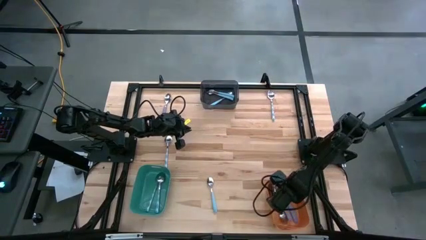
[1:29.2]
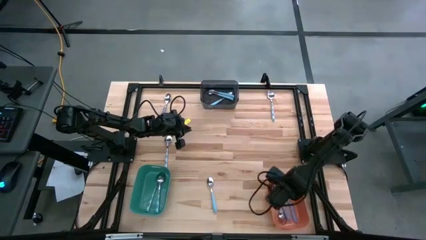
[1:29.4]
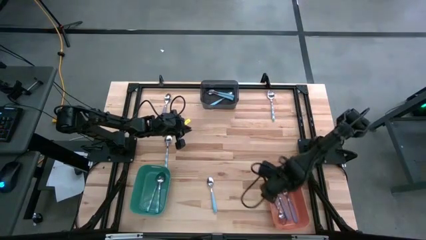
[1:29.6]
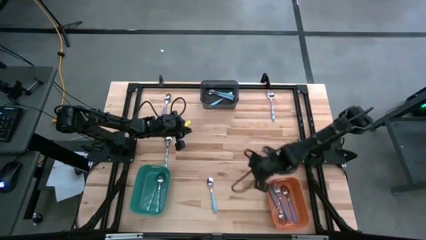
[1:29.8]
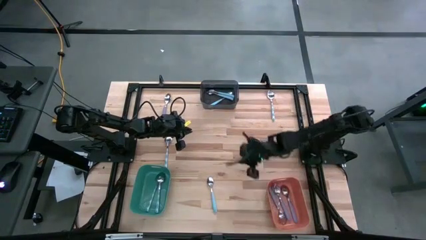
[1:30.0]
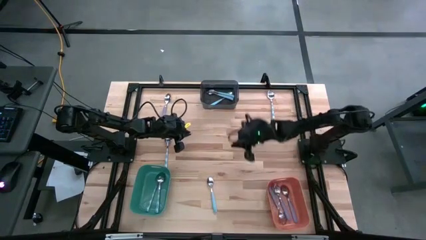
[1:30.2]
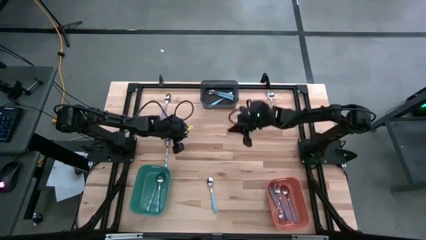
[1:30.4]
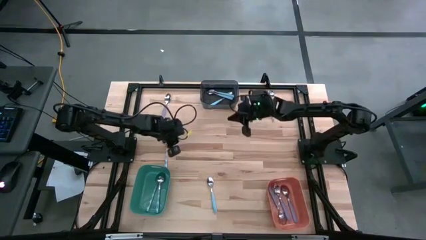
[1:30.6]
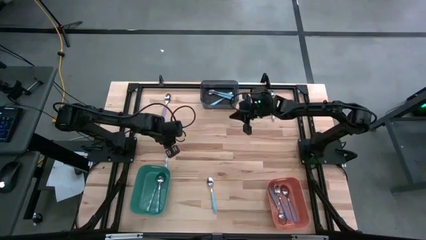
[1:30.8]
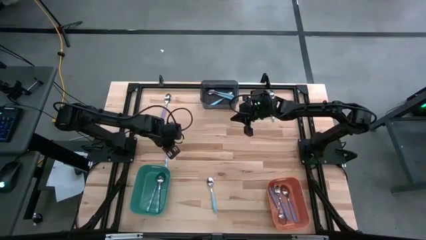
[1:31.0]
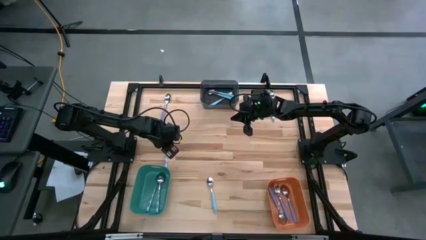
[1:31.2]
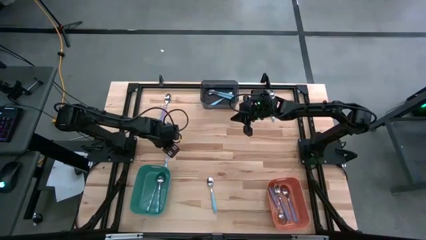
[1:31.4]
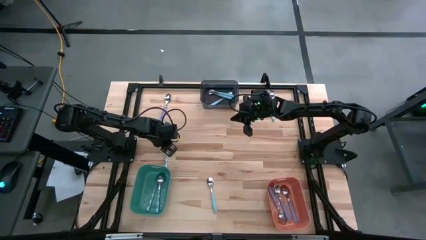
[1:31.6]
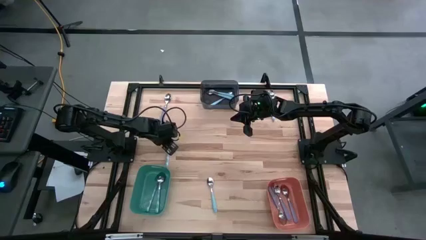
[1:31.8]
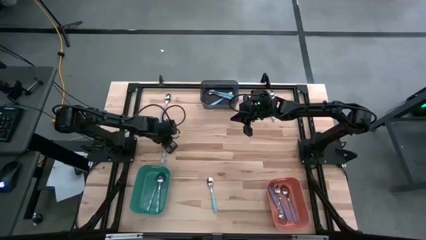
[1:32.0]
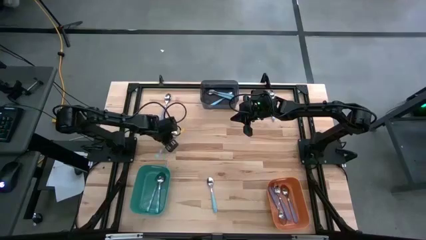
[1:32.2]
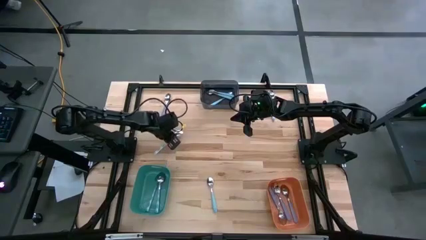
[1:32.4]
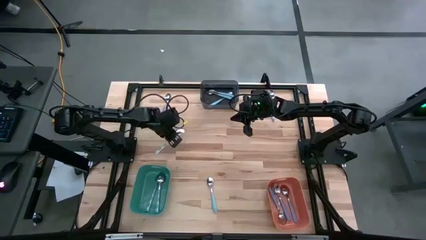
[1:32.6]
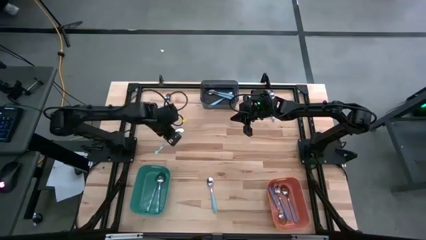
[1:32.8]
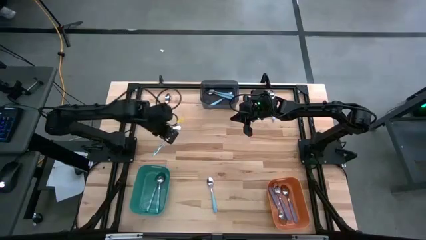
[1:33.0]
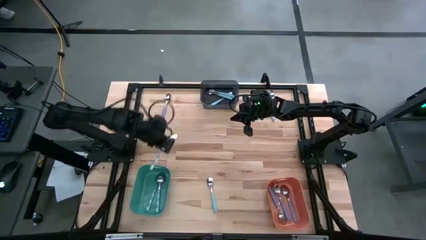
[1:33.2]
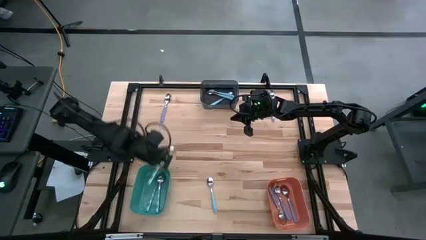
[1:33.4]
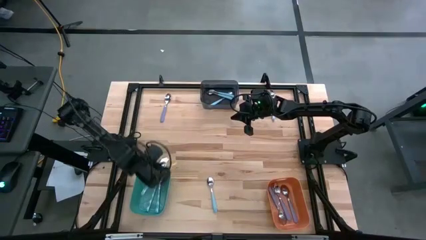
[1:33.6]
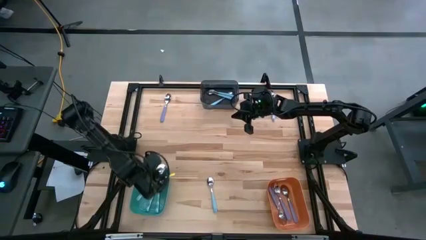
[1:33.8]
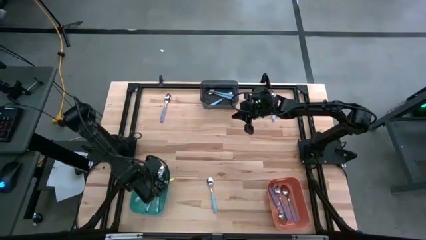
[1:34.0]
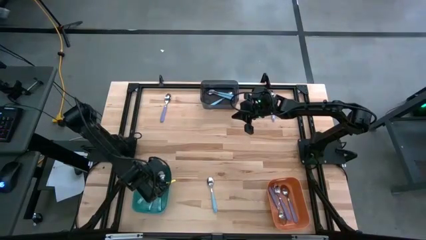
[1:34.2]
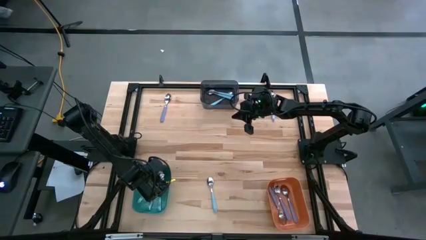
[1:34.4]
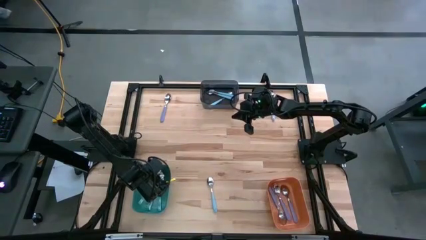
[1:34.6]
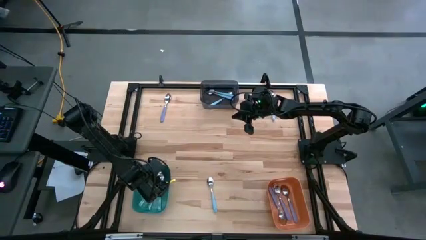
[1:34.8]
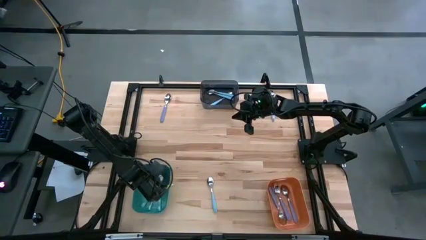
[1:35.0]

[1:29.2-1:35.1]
Task: Sort silverware by color (type)
Put the white and blue spoon into the blue bin

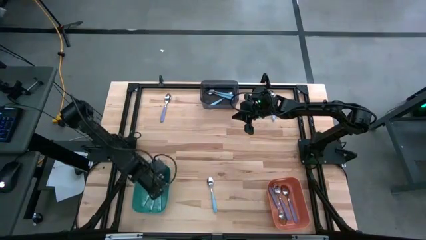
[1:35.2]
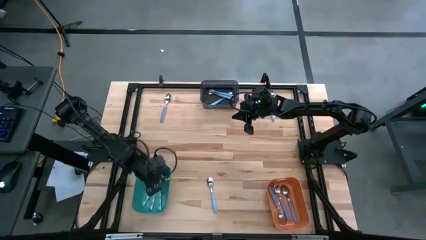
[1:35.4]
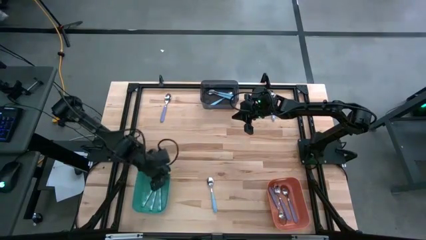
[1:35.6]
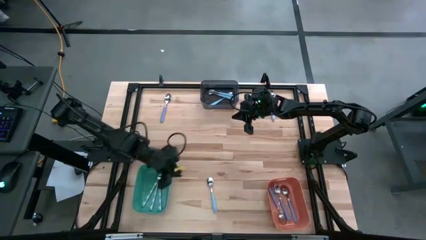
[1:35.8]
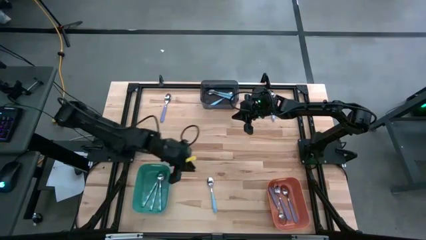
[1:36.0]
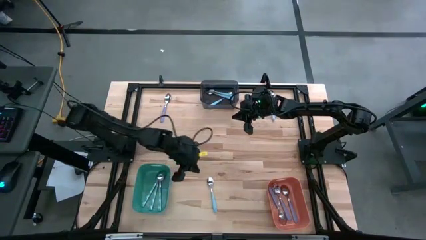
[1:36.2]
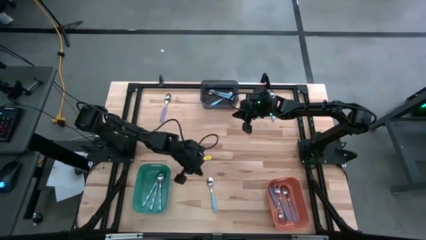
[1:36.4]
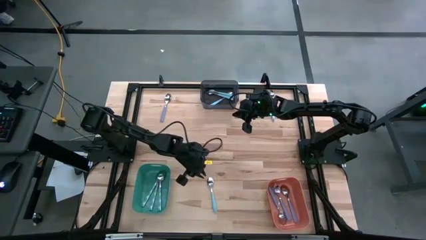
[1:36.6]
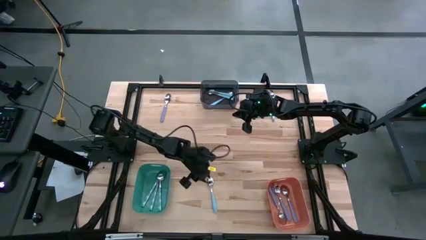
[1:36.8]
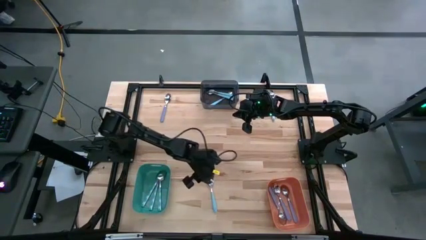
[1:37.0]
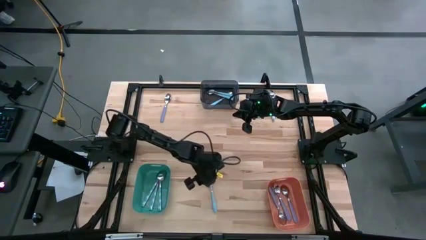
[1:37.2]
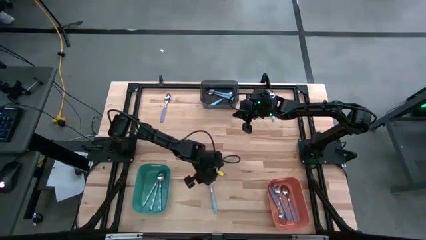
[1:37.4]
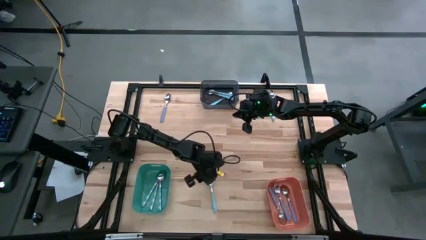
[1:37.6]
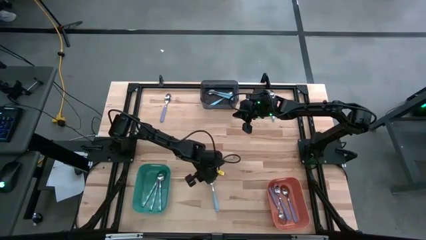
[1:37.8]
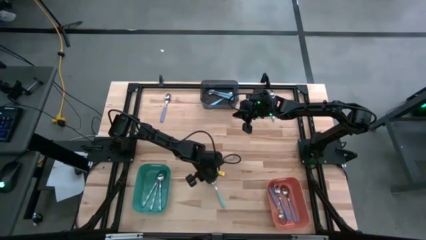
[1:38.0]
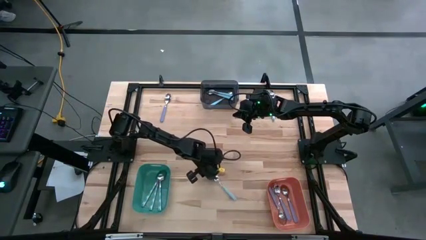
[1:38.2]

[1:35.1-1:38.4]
Put the blue spoon into the black bin

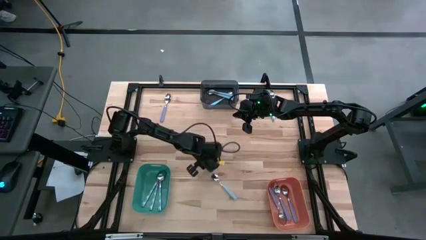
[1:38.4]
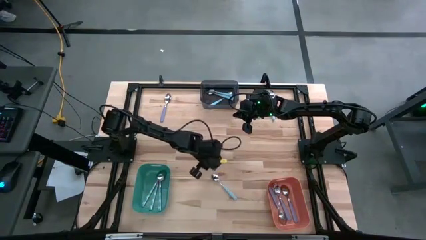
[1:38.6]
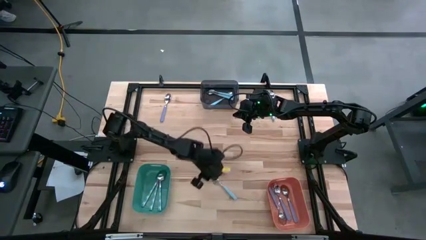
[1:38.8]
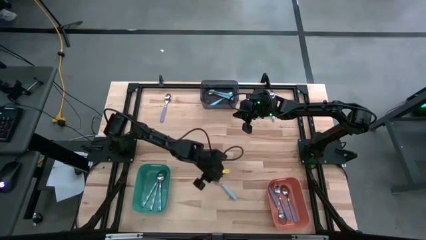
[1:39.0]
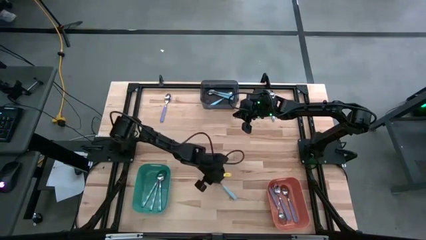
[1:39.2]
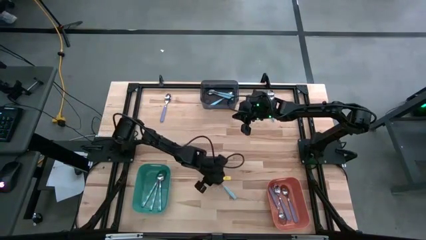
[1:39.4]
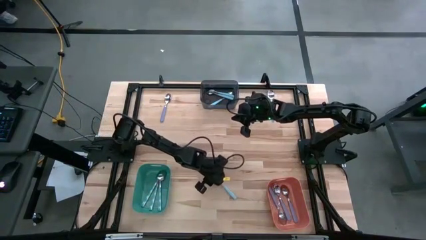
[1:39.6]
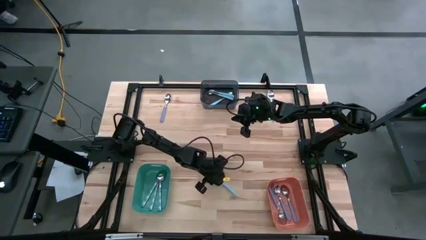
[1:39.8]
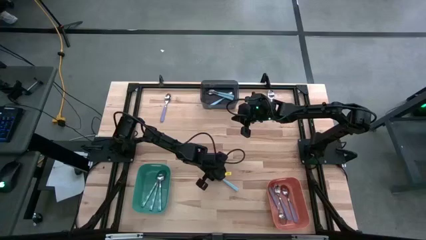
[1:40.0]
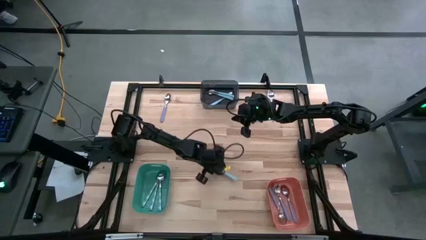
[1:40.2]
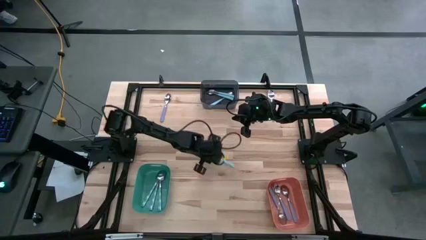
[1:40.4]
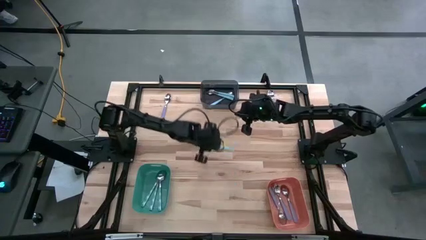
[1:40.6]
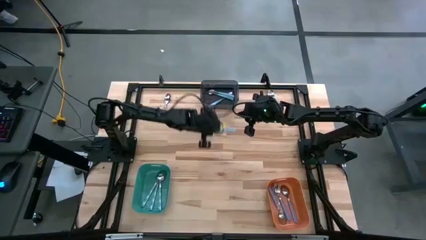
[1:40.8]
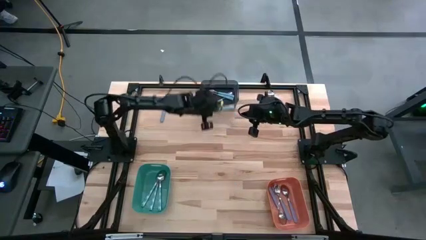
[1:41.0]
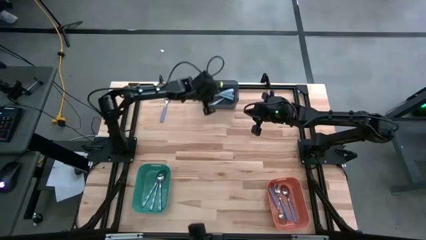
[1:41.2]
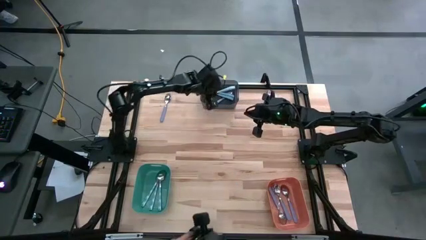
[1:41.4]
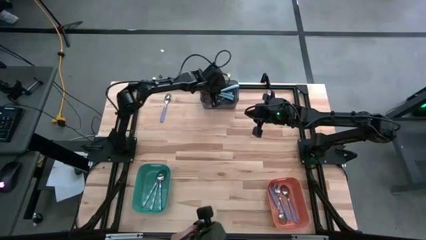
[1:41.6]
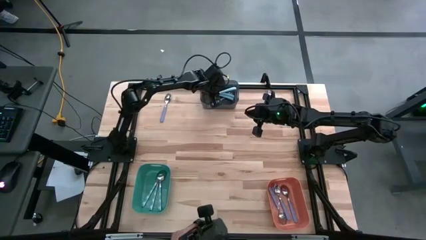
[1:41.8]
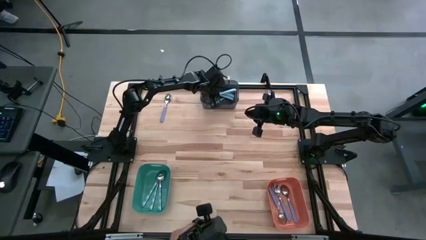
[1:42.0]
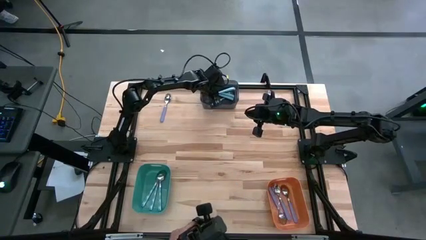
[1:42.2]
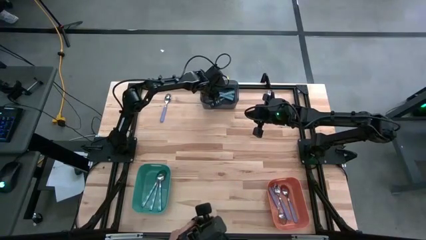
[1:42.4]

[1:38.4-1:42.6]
Put the blue spoon into the black bin

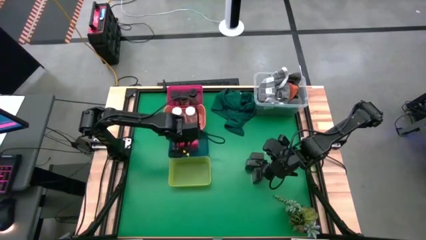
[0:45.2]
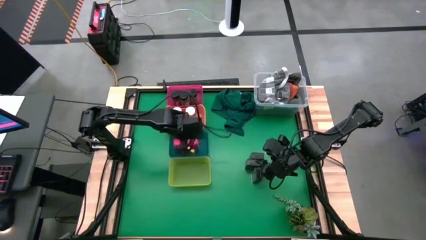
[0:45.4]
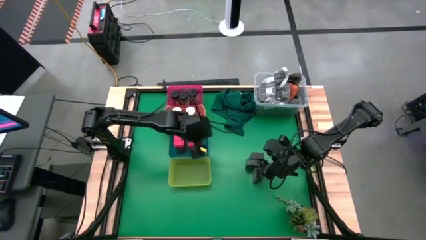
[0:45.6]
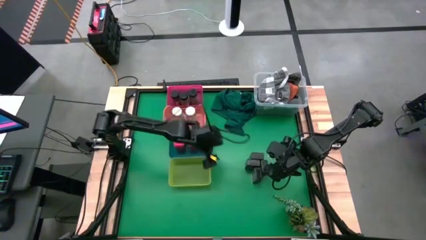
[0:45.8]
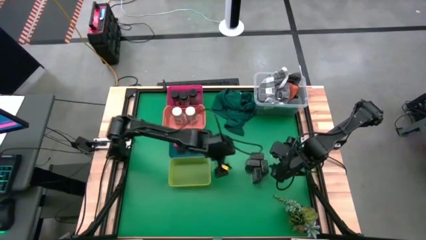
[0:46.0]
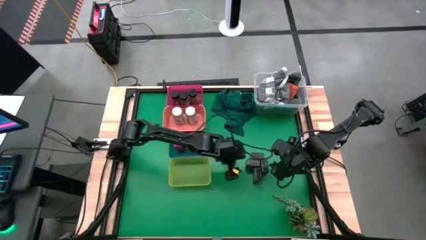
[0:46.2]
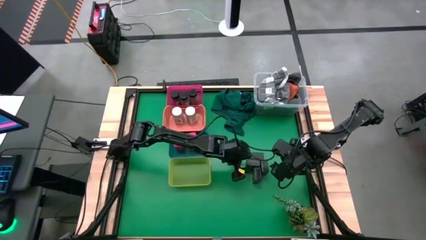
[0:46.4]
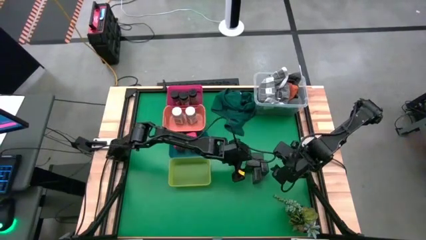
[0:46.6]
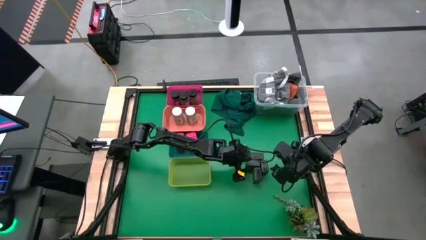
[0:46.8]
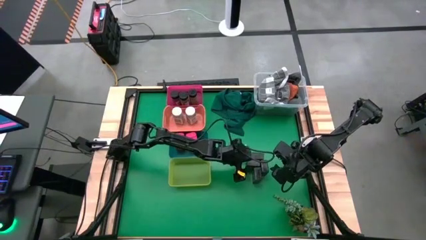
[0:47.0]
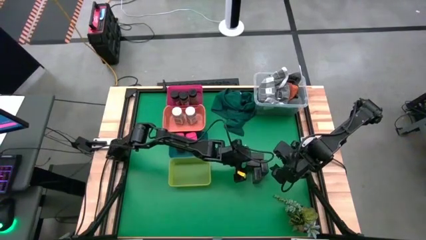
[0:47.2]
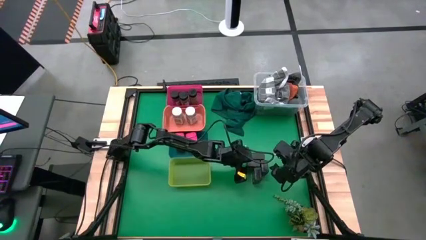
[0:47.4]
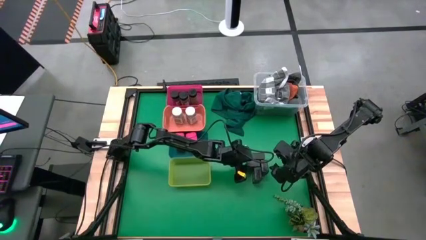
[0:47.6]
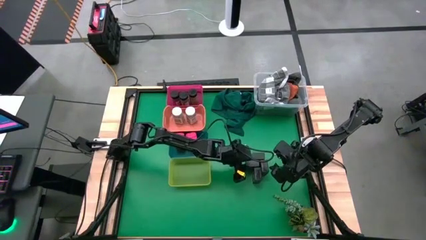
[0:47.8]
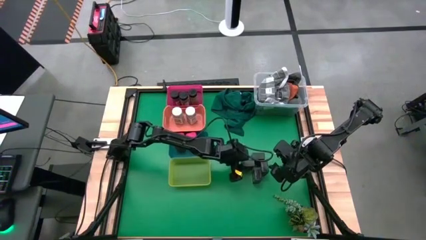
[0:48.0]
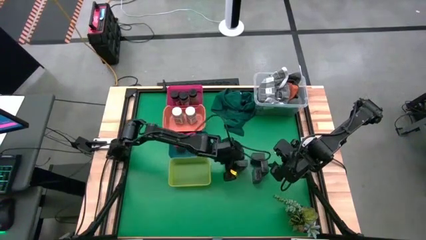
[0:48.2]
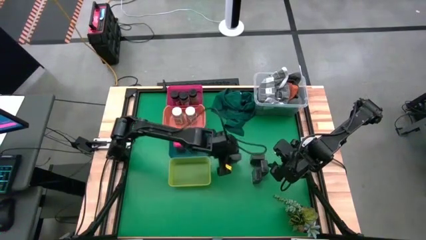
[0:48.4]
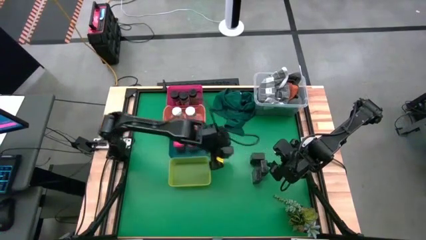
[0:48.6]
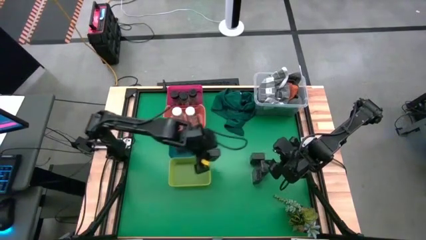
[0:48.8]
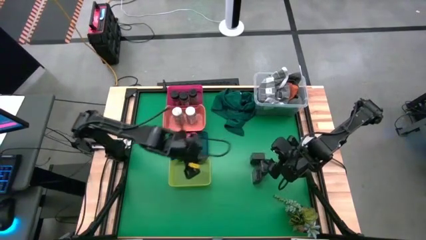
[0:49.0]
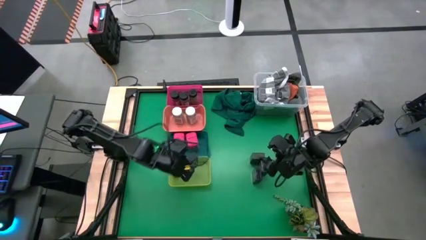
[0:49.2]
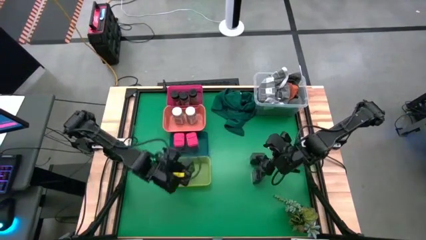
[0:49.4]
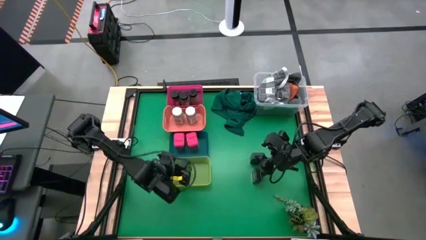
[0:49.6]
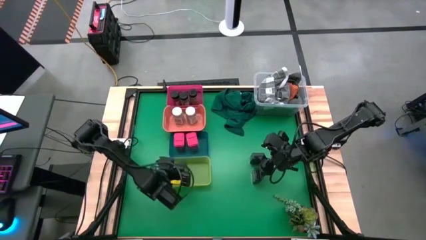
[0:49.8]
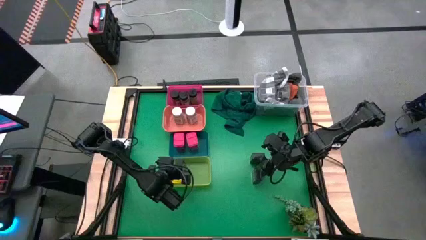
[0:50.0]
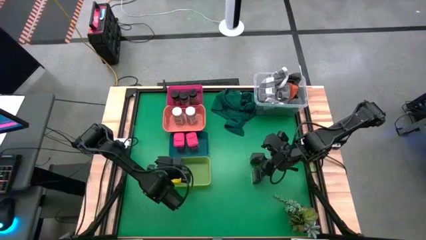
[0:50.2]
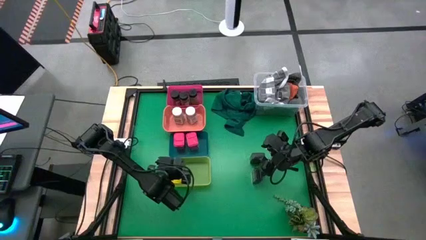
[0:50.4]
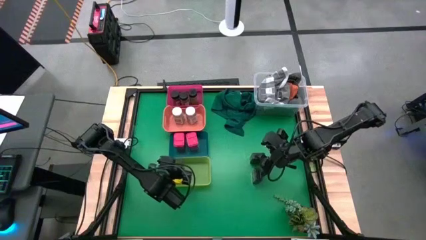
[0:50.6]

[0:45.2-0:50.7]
Task: Sort spices by type
Put the left black spice can into the yellow bin
